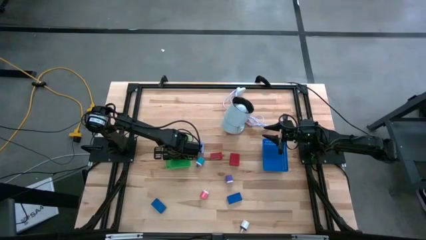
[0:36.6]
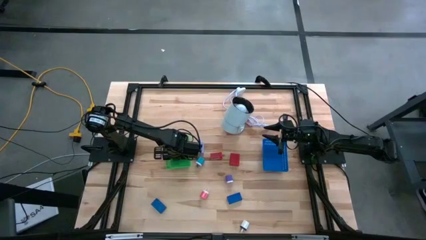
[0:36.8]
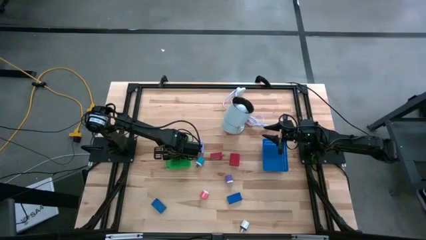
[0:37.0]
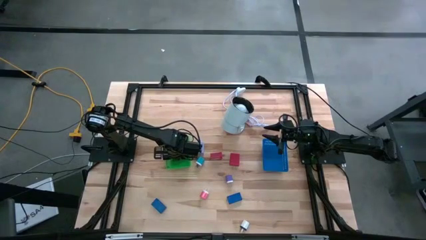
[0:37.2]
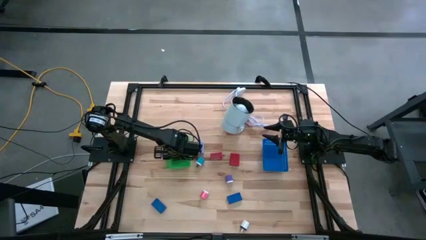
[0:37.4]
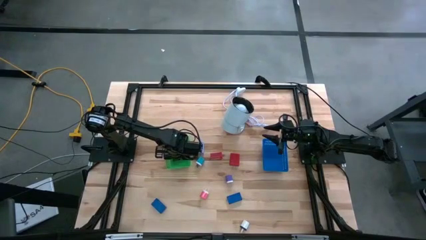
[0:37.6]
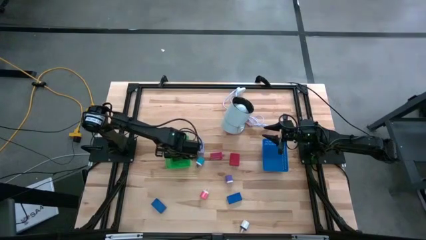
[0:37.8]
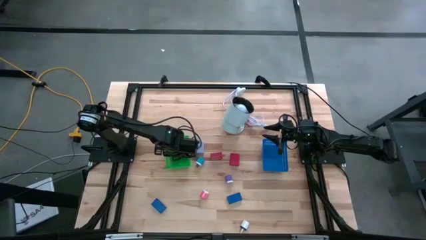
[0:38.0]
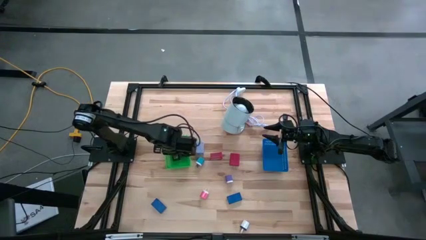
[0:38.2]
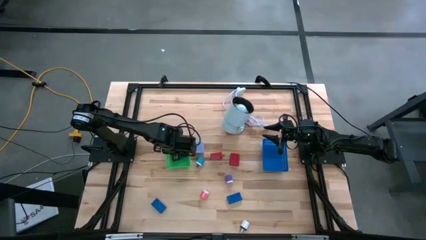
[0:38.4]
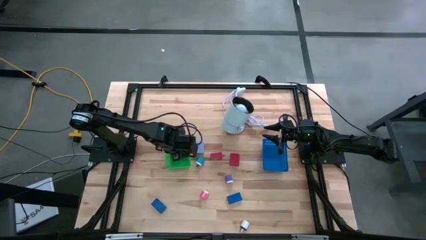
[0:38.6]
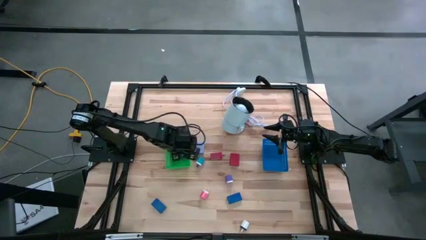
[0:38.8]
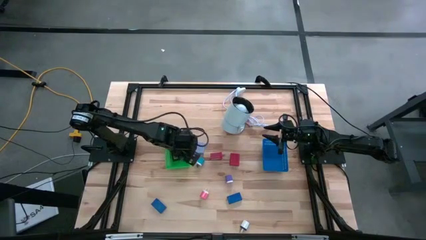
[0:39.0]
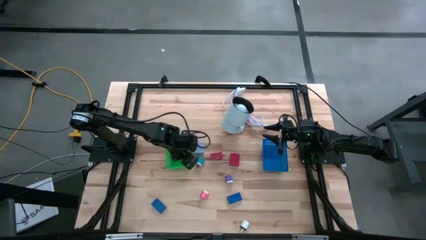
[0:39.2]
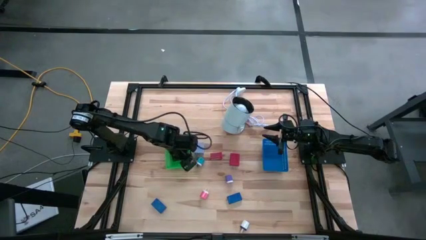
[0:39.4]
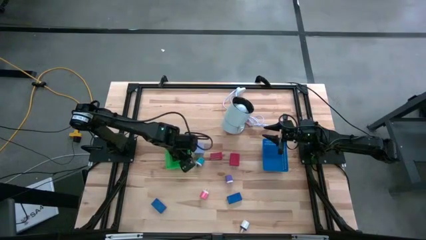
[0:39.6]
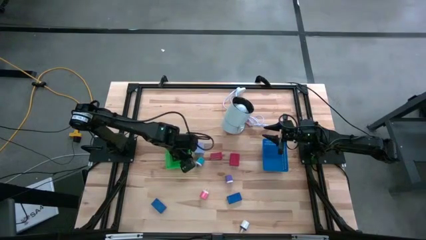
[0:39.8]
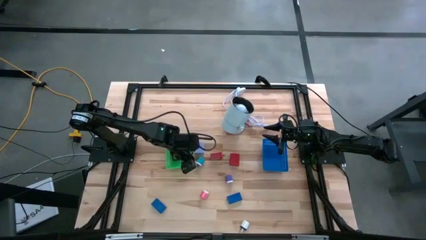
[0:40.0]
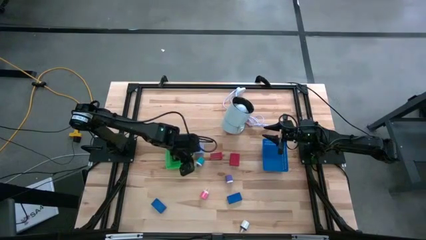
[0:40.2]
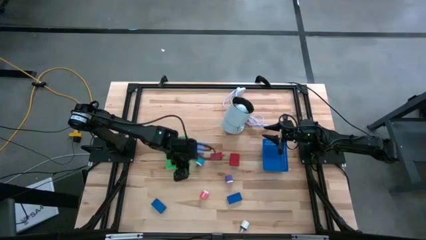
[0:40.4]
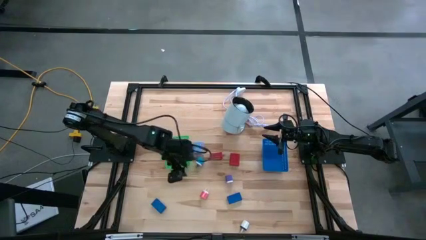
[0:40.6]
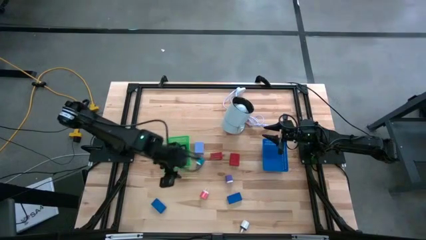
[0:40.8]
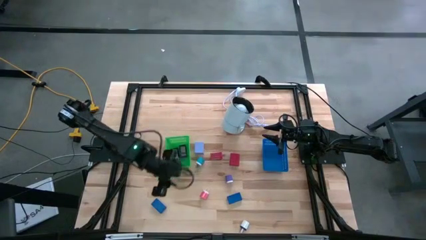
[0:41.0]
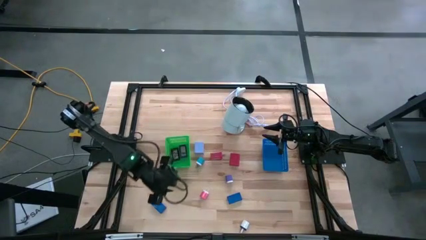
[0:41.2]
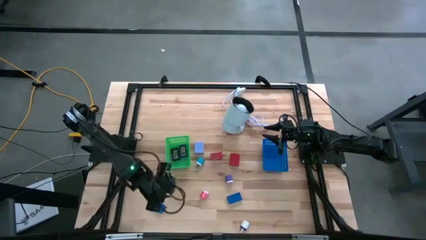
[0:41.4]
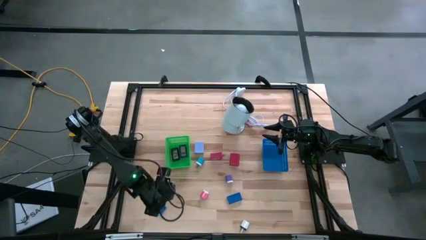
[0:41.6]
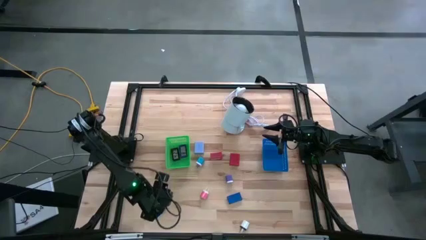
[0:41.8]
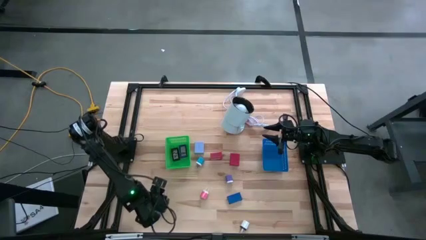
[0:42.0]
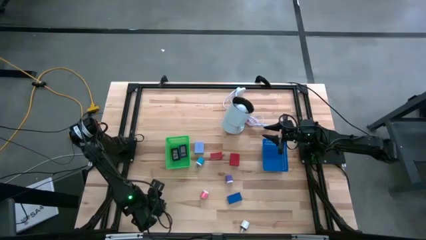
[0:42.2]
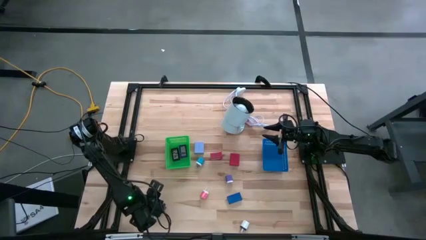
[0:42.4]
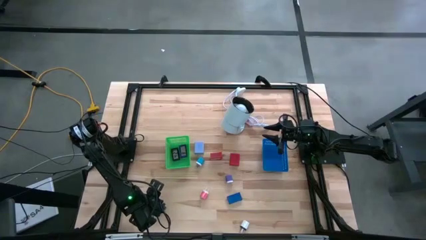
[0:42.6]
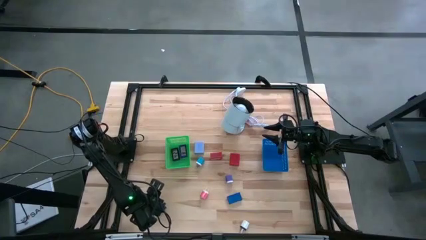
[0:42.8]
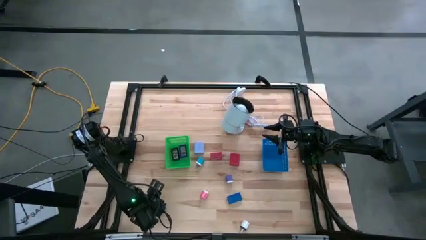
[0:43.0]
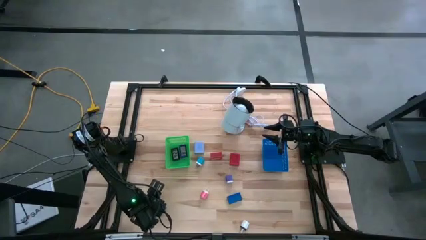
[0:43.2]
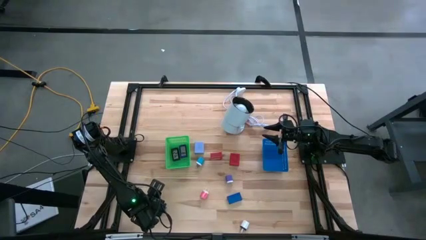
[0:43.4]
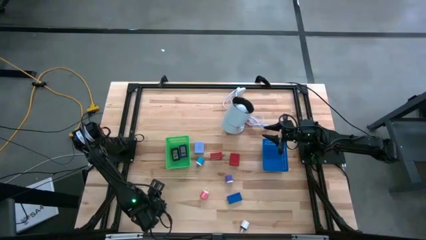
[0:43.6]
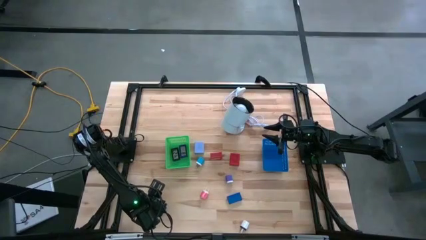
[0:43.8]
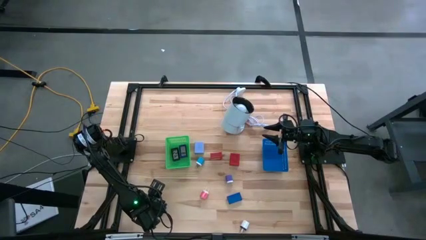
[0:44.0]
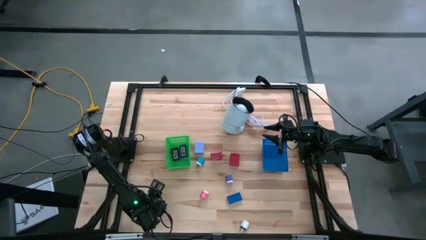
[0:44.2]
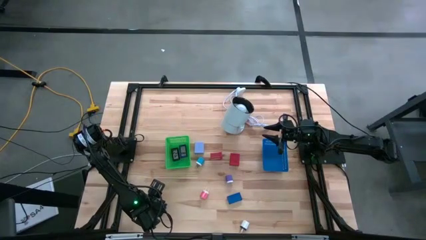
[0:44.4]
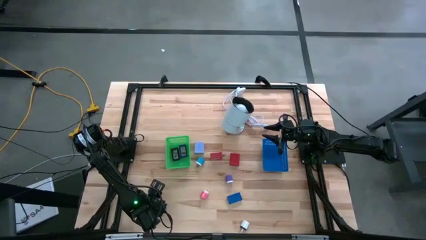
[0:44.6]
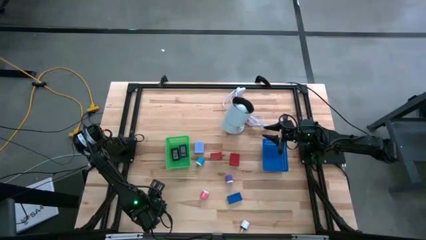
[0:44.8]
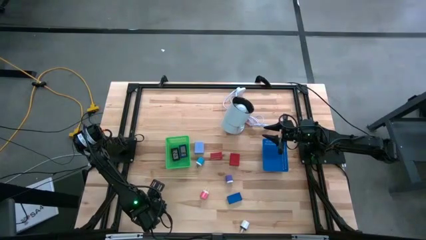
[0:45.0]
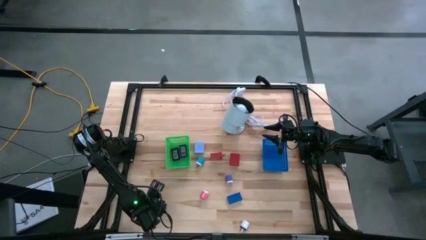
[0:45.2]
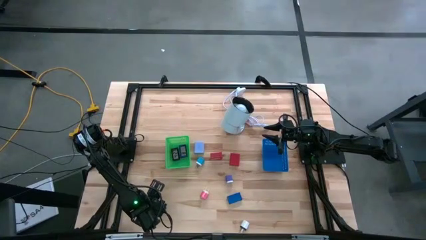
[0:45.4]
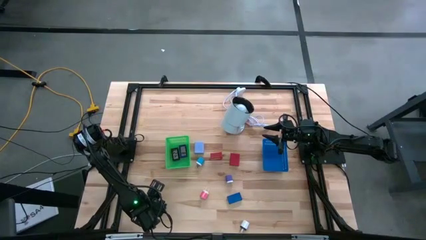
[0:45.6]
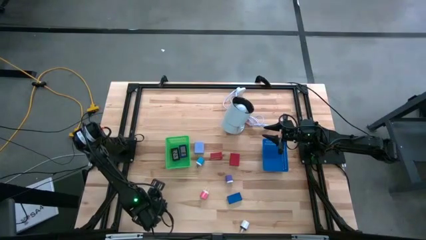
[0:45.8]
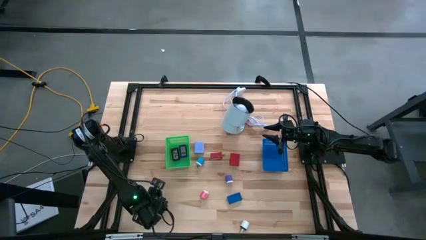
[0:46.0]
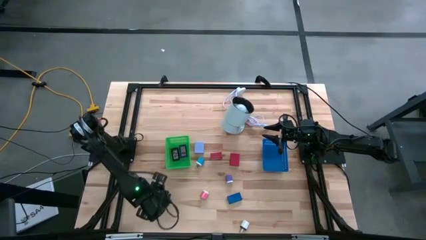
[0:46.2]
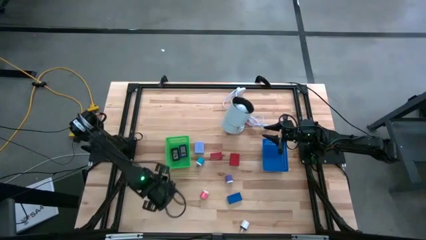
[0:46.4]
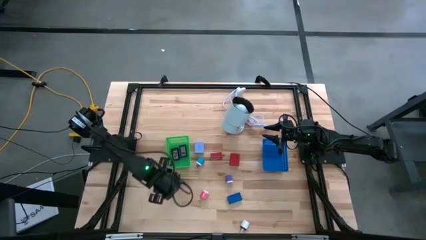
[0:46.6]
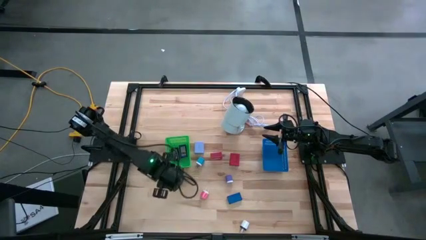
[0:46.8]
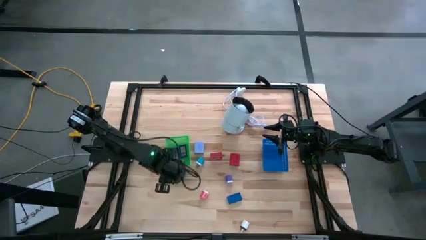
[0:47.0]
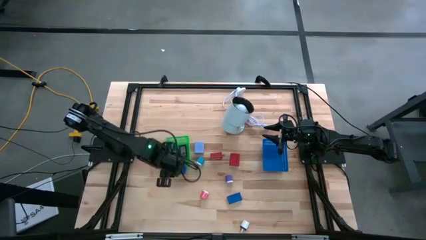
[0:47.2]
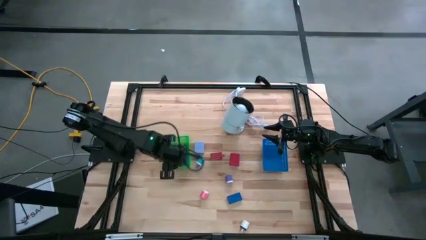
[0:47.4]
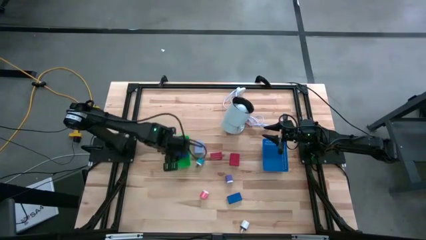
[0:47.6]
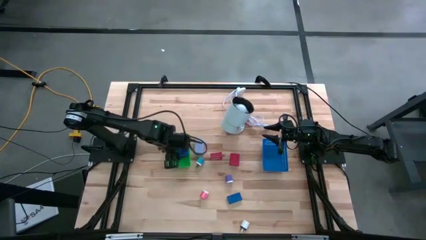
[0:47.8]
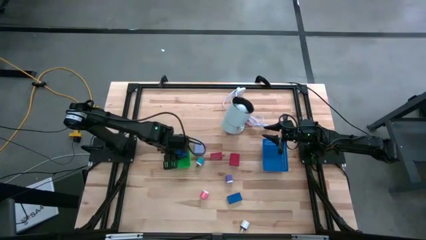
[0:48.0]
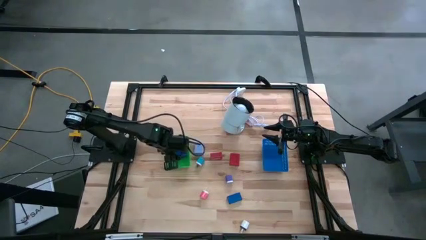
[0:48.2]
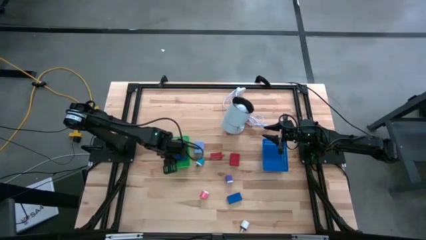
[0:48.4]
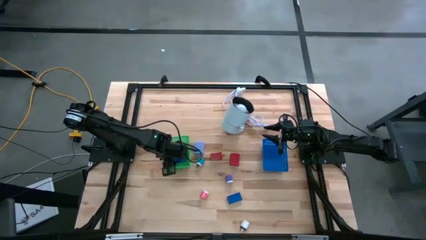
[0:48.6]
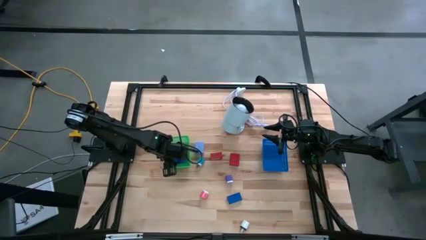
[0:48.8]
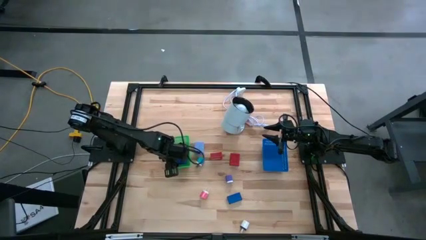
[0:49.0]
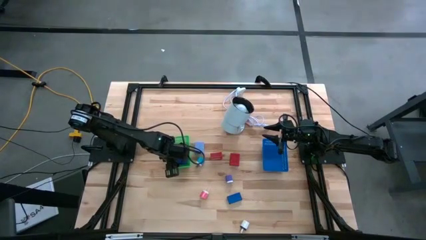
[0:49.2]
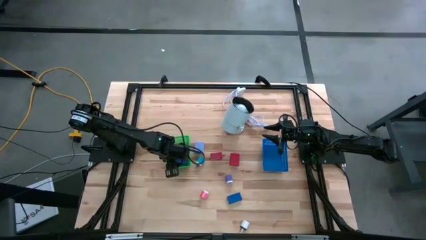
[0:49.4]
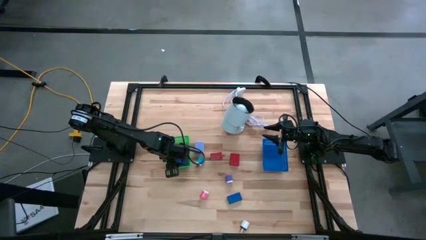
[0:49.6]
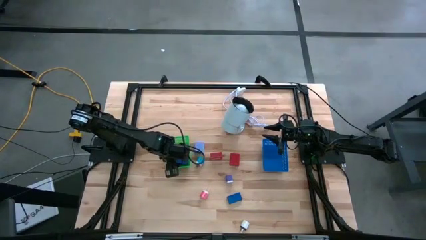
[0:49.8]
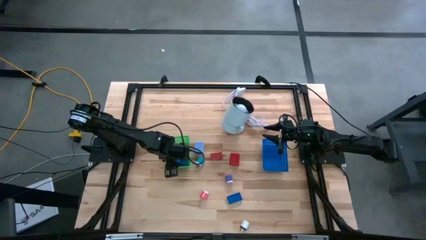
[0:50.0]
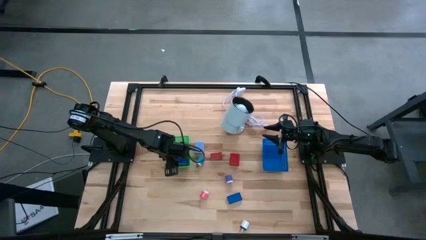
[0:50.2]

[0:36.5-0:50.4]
Task: Pick & Place Office items
Put the left blue digital timer into the green bin
